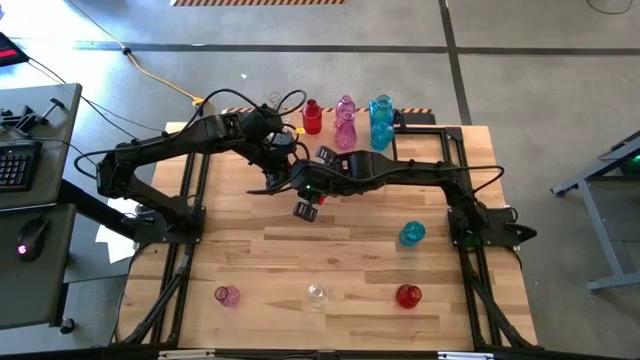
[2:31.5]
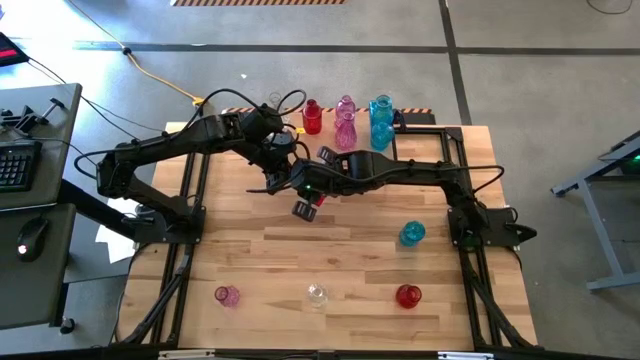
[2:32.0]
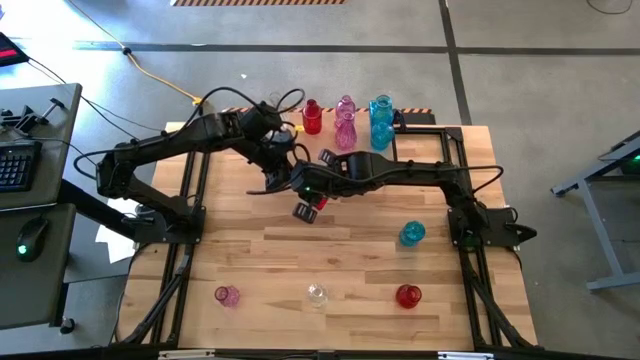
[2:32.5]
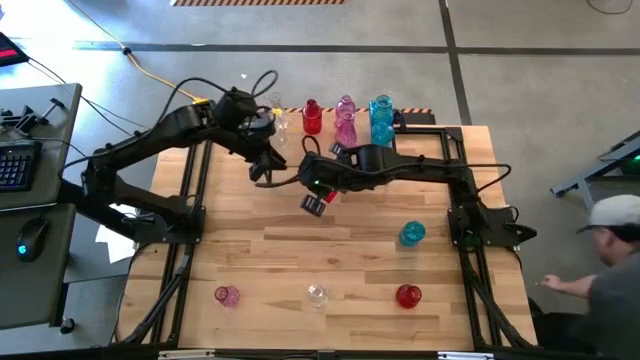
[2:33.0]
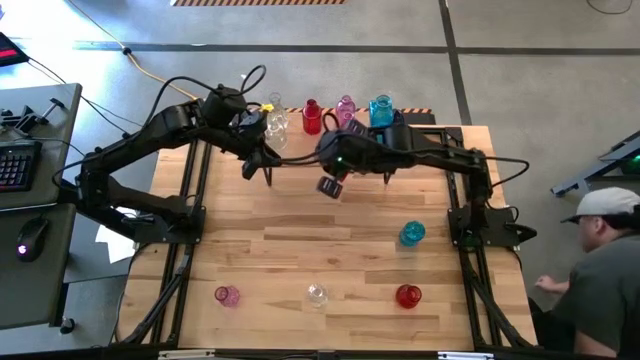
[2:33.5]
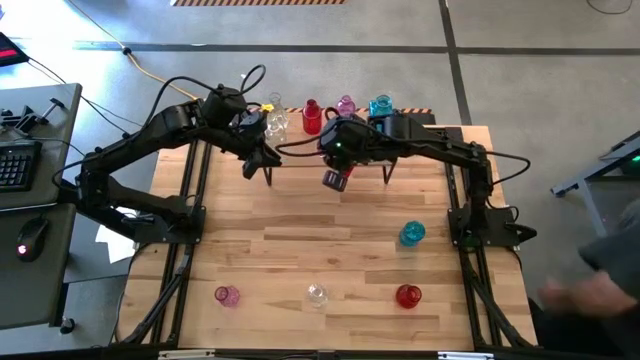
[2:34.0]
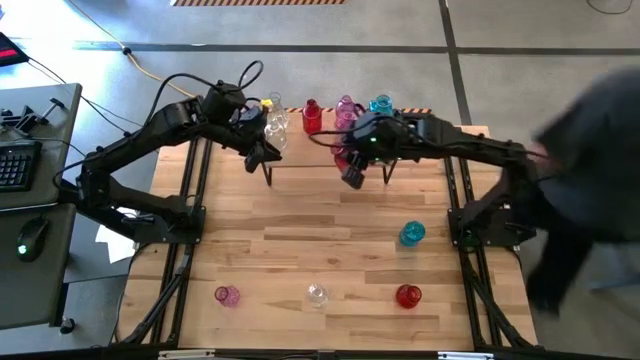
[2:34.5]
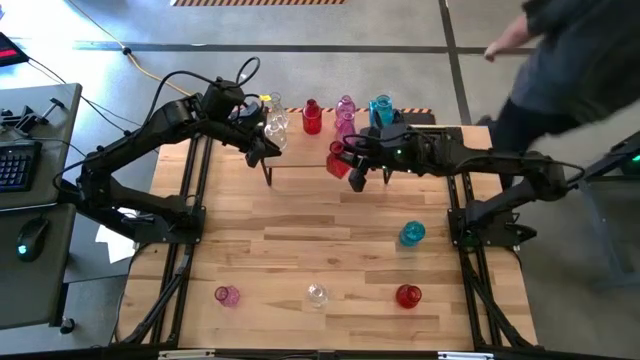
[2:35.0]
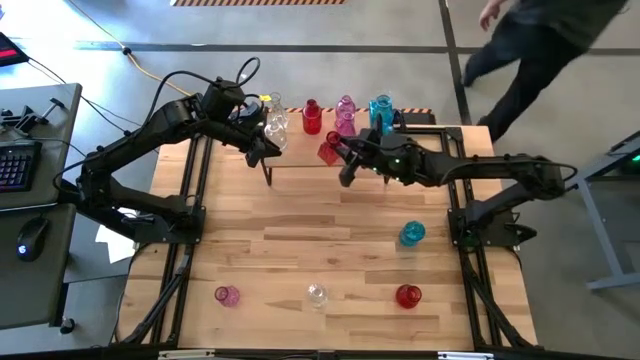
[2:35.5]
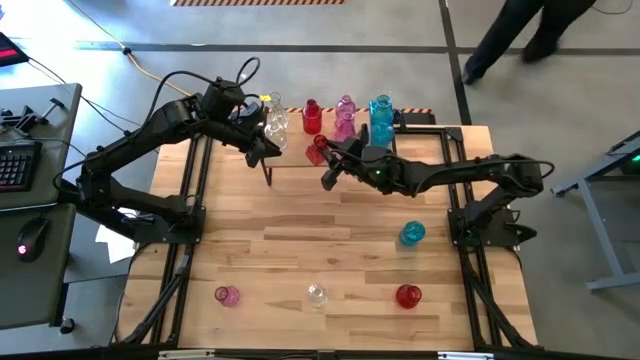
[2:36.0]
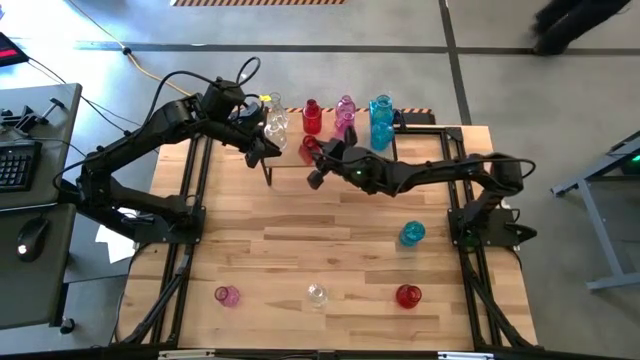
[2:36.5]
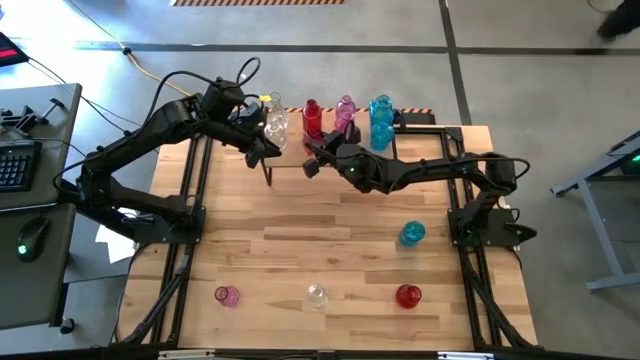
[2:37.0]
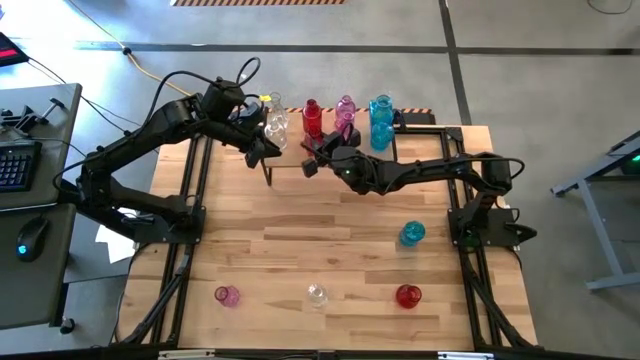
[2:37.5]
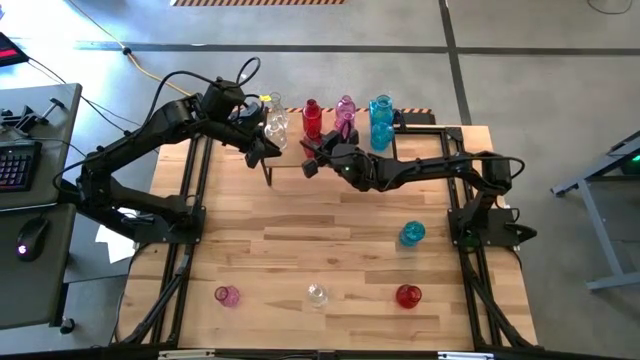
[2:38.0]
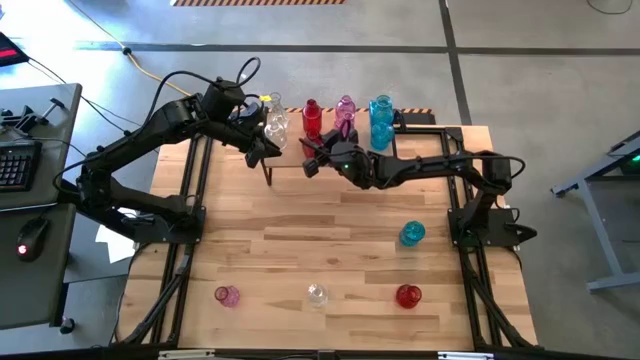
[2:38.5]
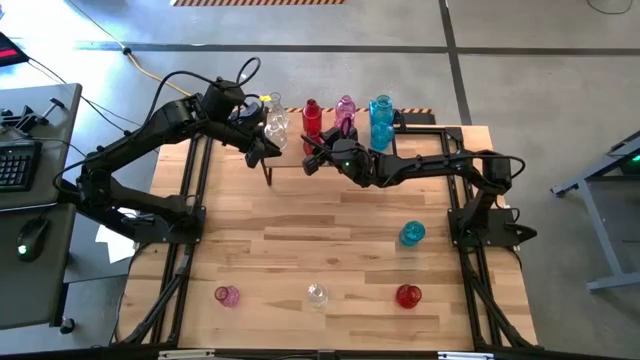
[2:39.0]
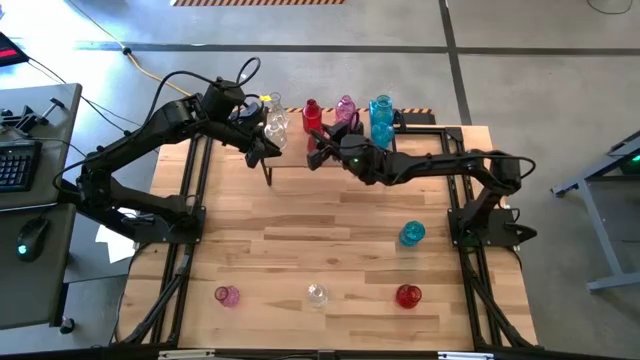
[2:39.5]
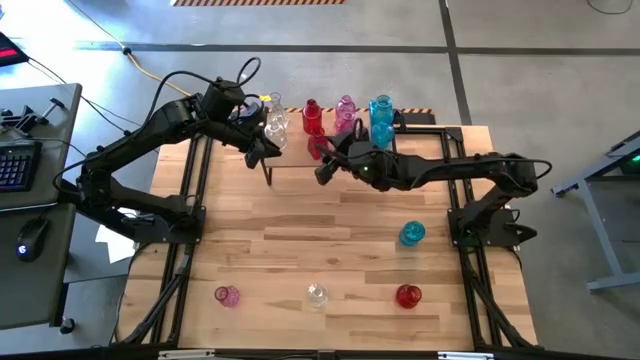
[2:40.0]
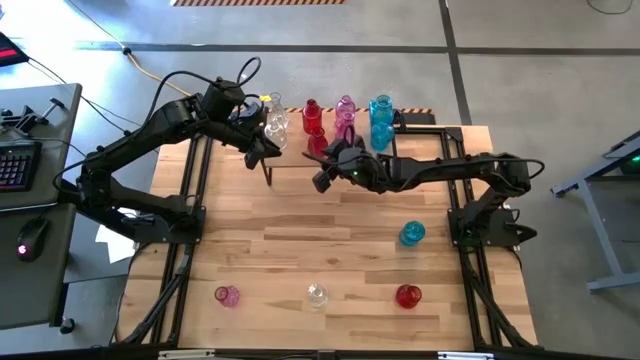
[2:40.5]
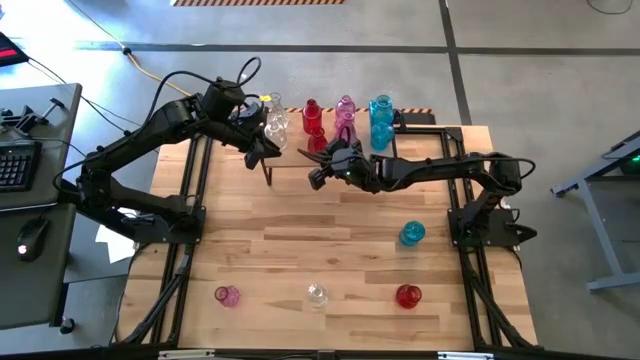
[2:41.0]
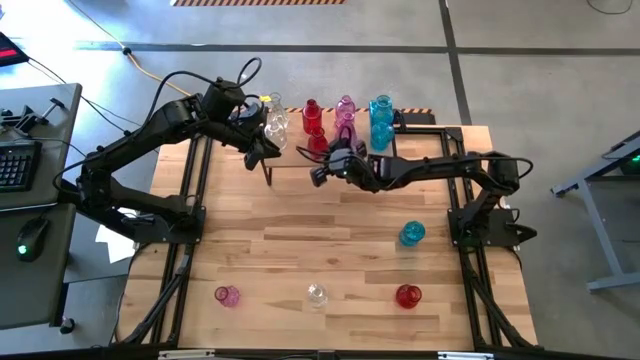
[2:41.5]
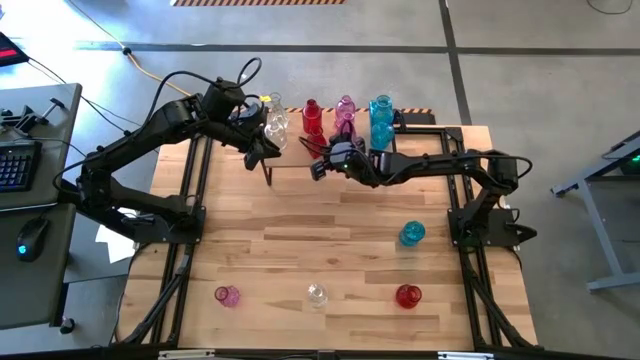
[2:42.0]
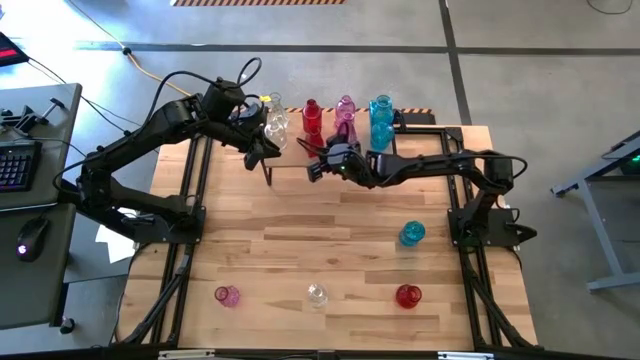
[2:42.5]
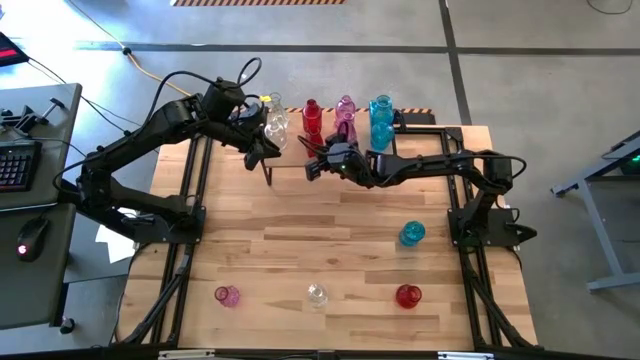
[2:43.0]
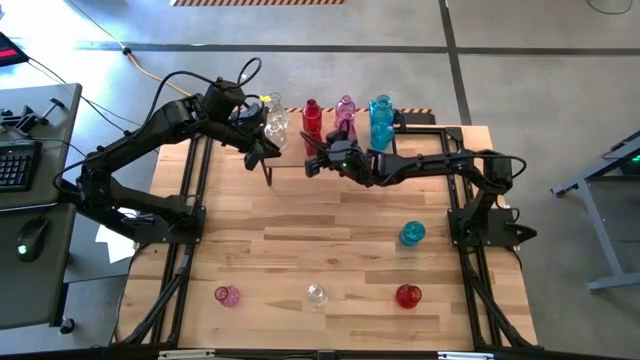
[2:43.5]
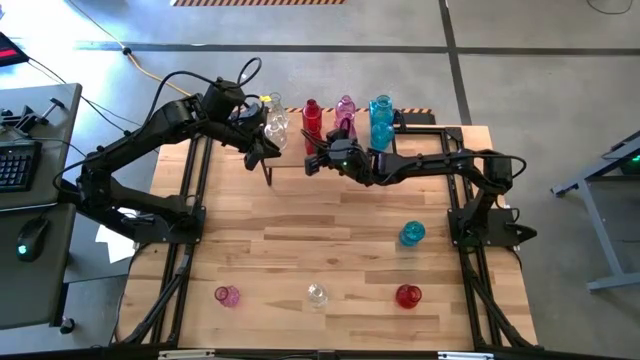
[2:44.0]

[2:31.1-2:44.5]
Task: sort vases onto shelf
Put the left red vase on the shelf aligned with the other red vase
